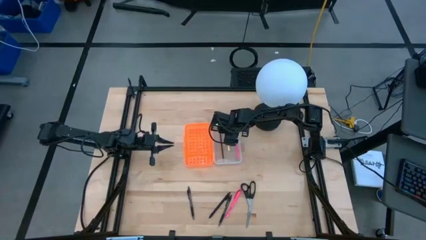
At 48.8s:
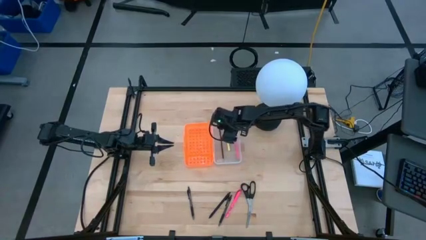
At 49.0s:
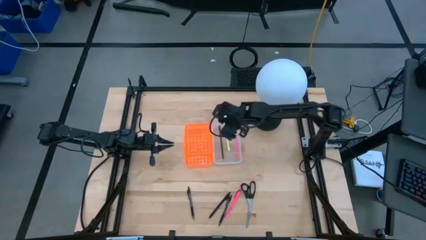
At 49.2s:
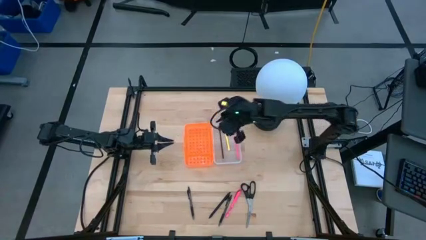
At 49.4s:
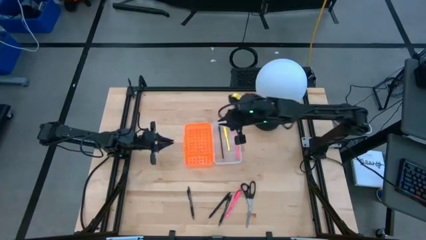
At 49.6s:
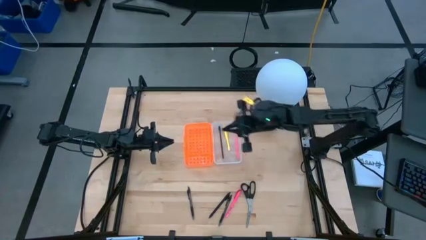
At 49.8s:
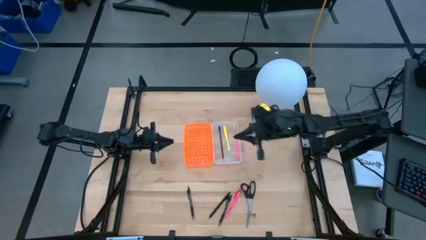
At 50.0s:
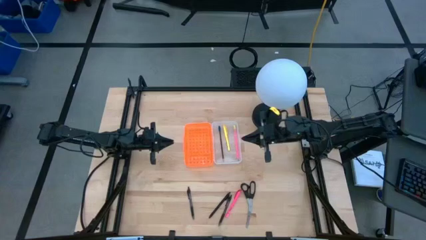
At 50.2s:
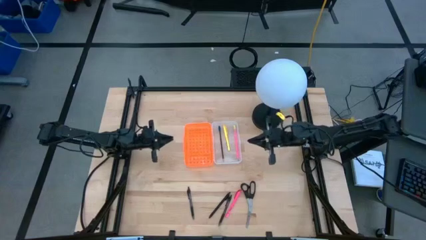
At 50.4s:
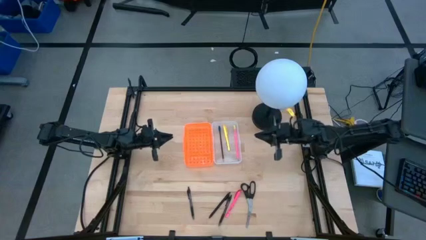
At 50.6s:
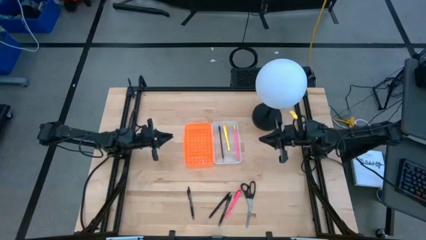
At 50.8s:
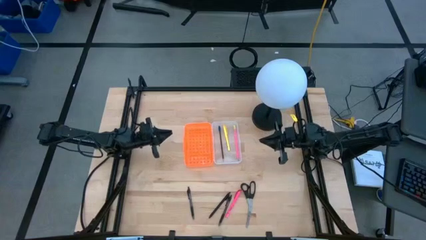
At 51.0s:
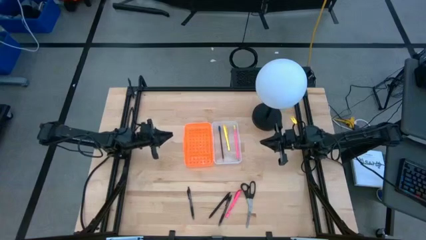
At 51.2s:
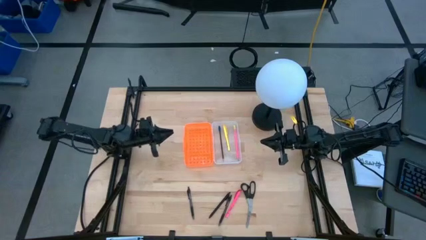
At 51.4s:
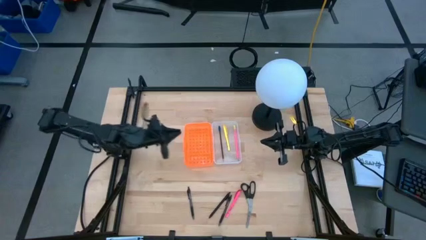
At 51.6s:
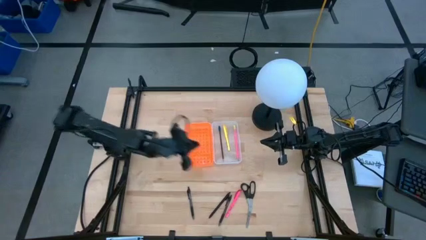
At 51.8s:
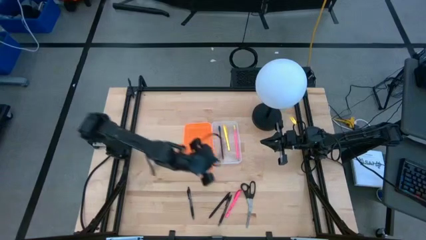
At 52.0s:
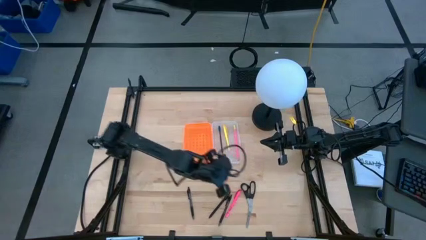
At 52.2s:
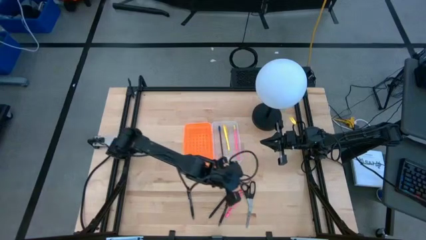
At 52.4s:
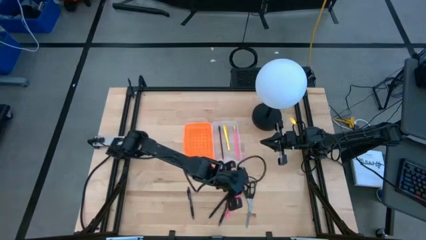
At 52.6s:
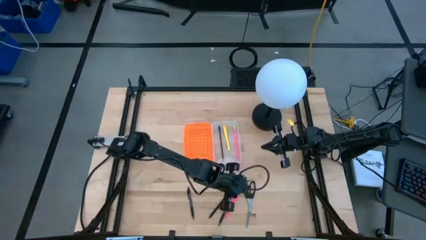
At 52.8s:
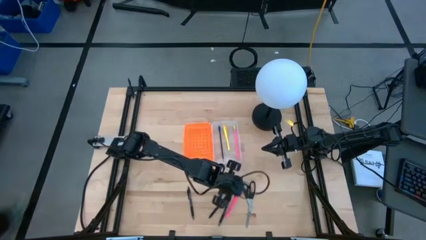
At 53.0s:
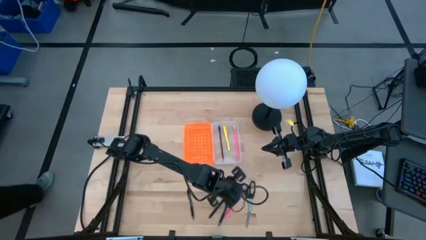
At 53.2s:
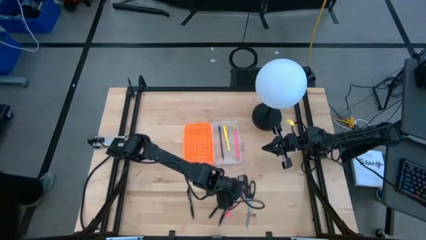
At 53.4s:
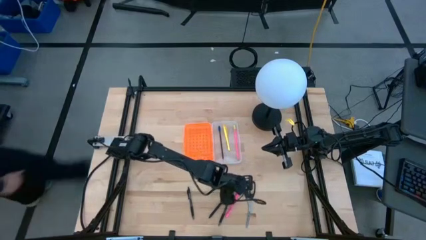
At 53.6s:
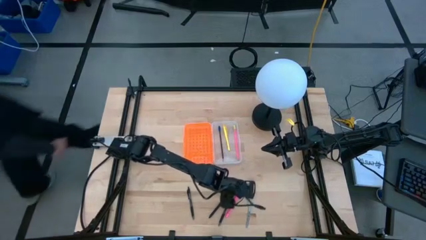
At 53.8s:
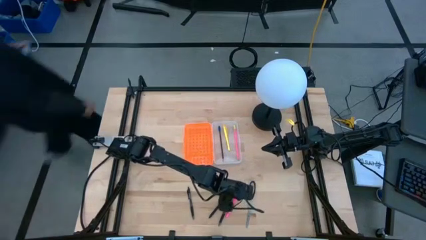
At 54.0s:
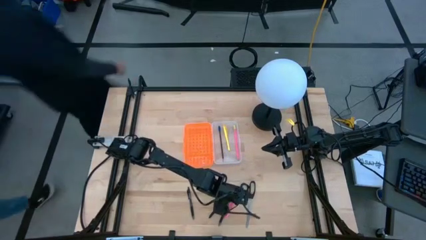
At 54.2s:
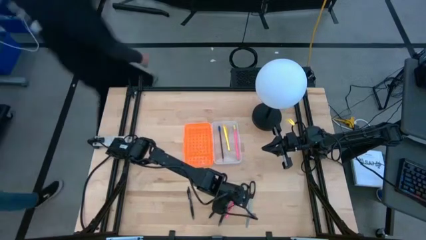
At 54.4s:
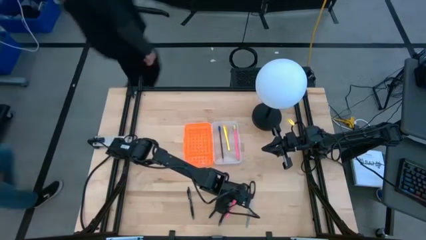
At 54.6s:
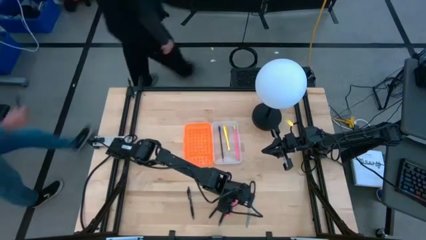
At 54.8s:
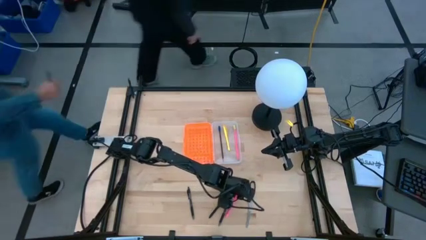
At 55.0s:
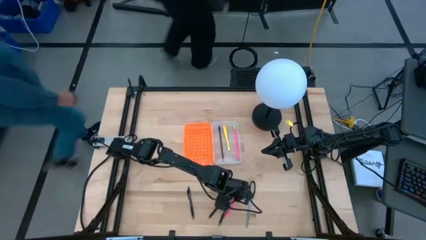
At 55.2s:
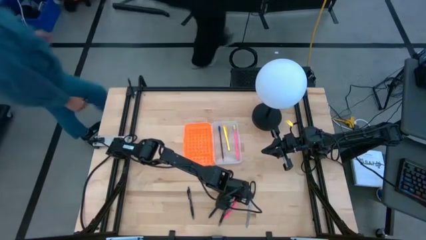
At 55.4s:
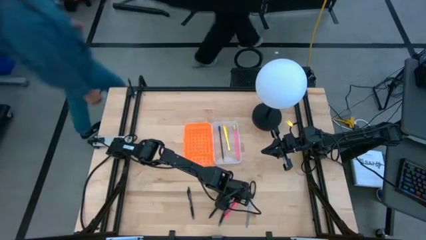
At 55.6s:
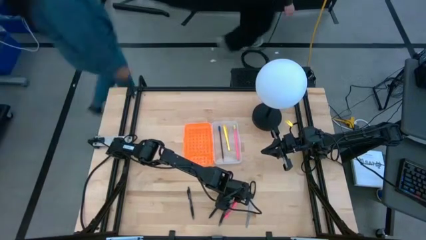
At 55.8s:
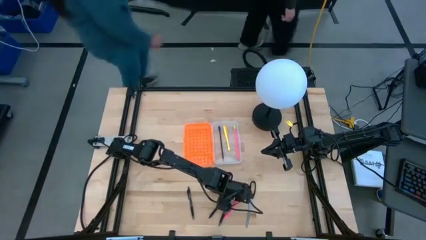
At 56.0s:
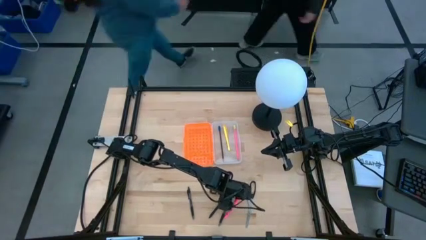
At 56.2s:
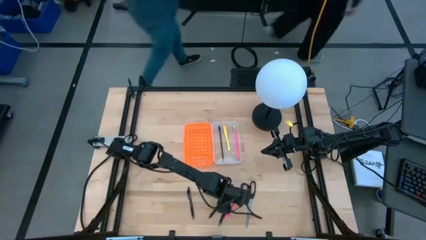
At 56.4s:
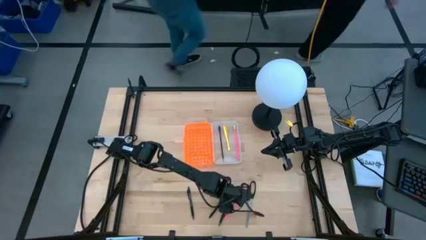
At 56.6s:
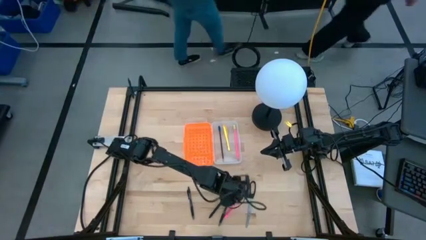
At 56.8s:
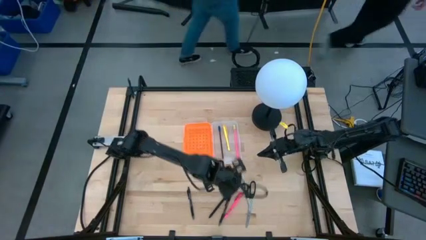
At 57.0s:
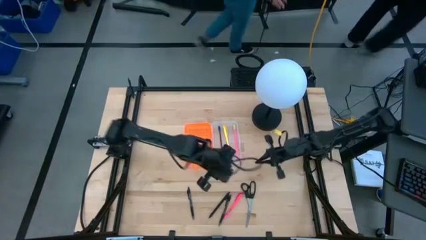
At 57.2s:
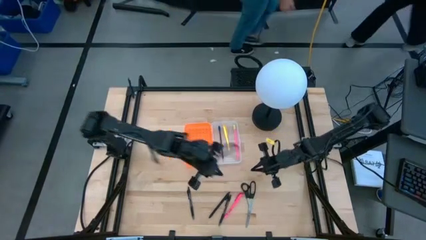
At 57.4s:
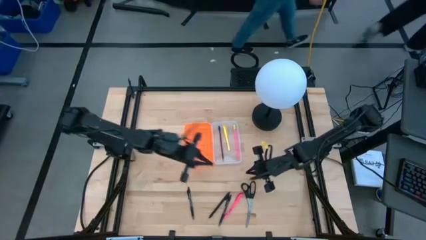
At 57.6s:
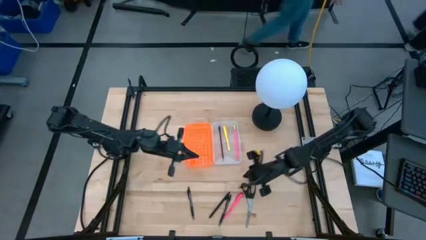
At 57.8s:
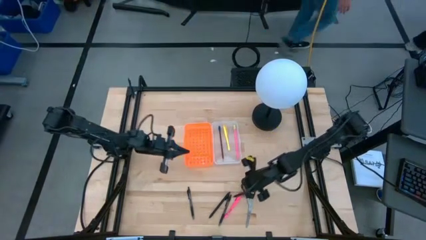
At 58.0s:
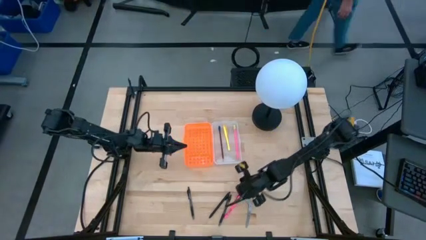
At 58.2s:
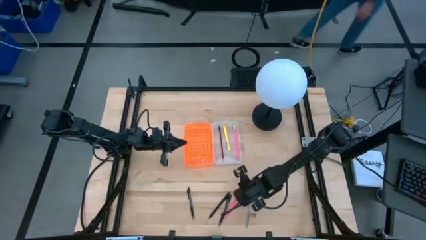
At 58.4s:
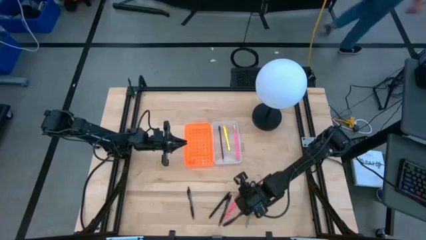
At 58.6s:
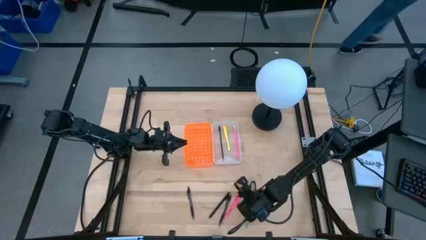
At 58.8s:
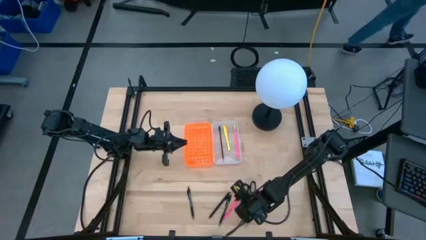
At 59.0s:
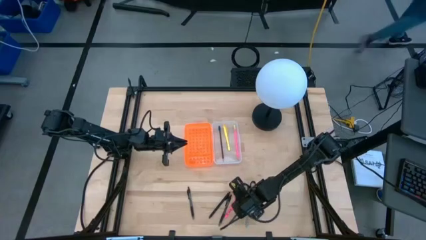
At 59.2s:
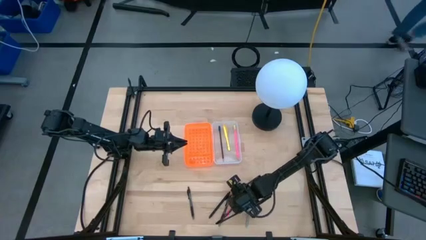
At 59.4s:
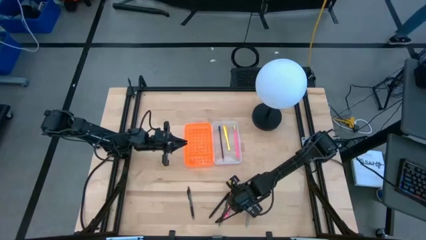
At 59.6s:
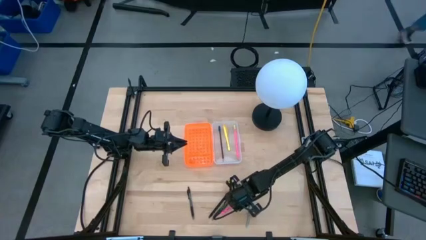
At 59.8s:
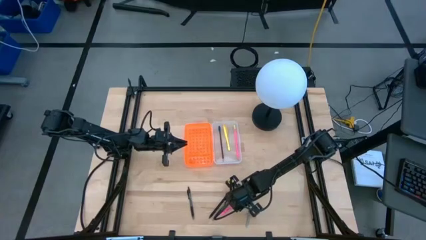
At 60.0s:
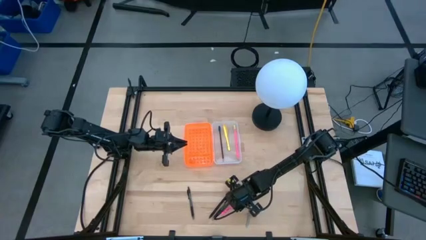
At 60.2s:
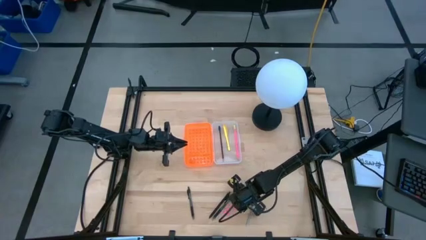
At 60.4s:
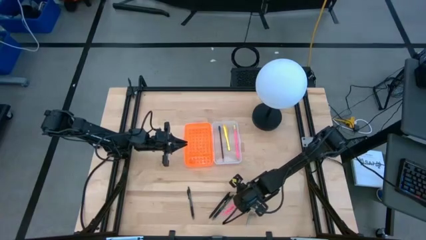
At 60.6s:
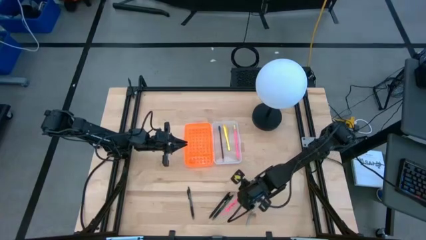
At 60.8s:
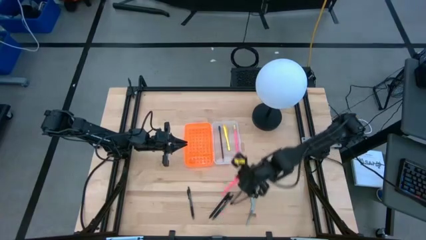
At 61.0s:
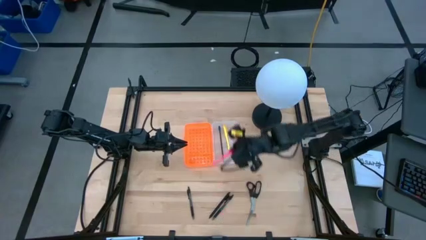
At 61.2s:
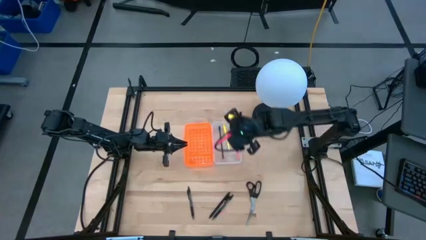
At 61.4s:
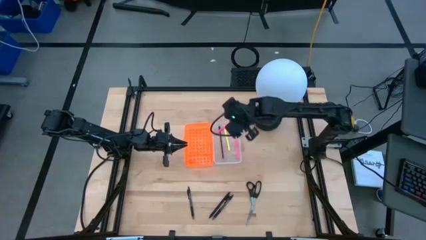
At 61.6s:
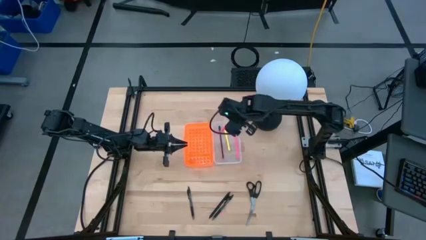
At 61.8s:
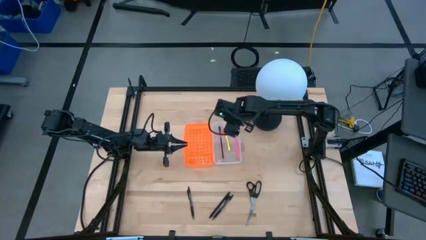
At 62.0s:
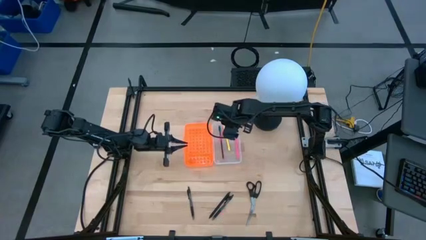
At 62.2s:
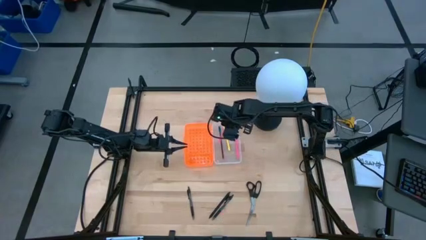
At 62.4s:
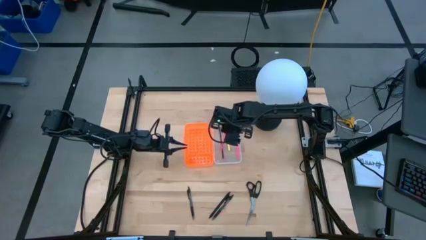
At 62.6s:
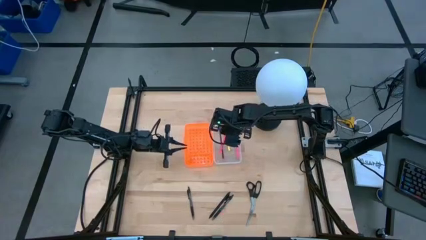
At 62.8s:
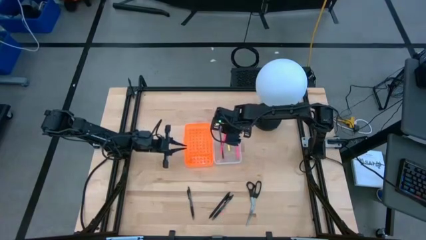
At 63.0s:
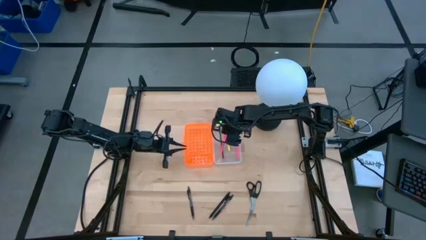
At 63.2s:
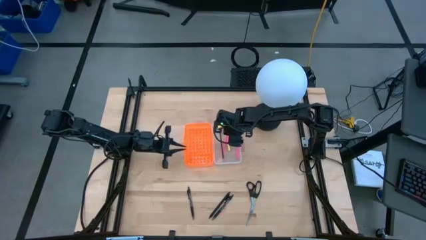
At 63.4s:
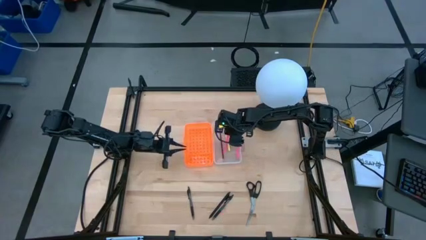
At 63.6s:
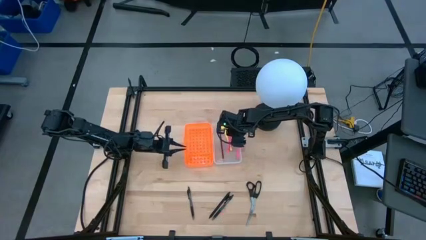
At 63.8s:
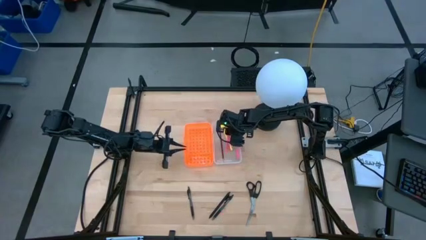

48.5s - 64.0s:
Task: Pick & place school supplies into a supply box
Put the pink pen into the orange supply box

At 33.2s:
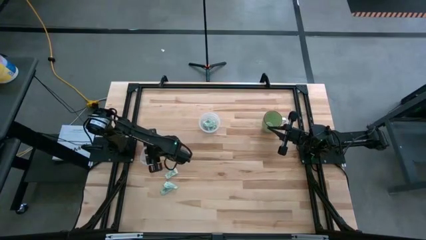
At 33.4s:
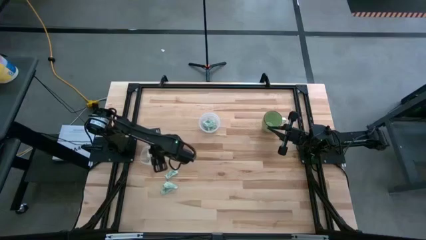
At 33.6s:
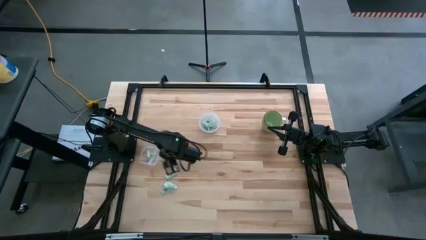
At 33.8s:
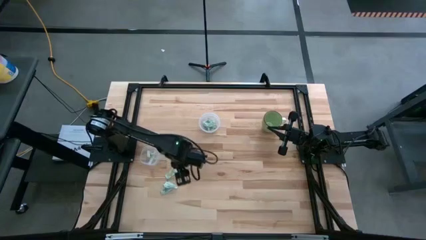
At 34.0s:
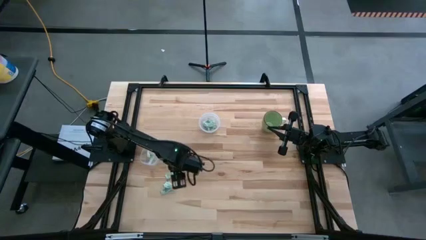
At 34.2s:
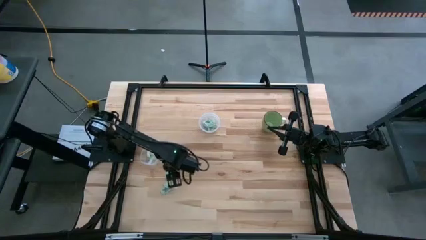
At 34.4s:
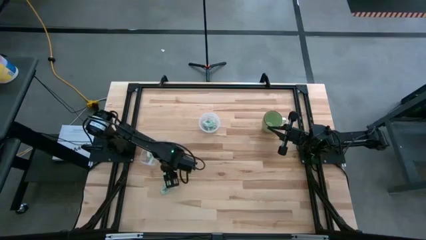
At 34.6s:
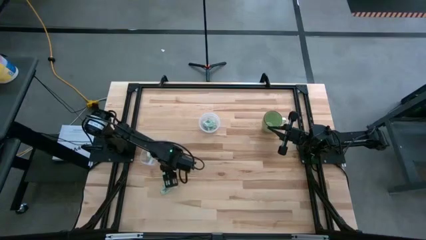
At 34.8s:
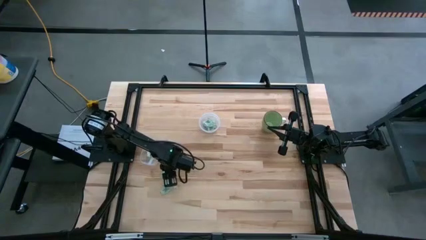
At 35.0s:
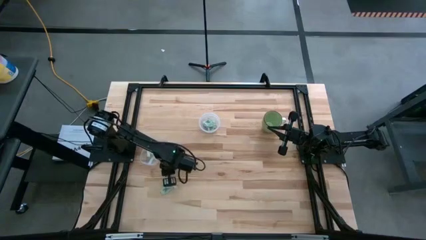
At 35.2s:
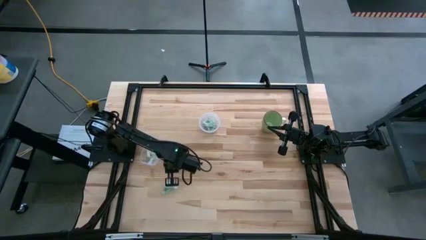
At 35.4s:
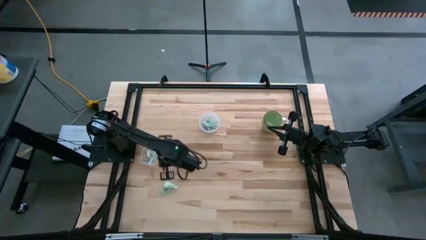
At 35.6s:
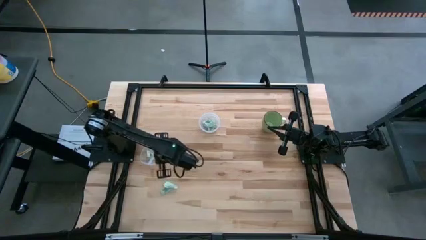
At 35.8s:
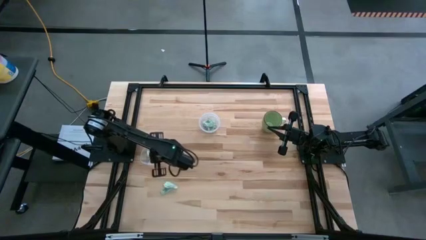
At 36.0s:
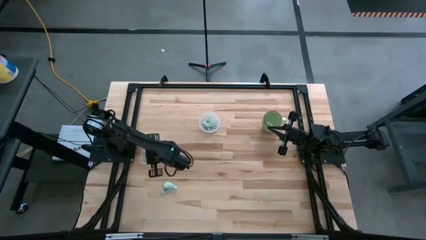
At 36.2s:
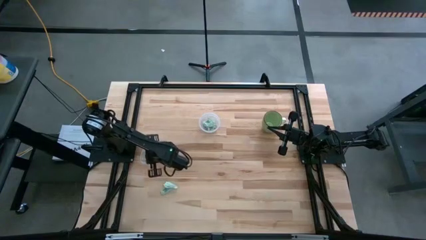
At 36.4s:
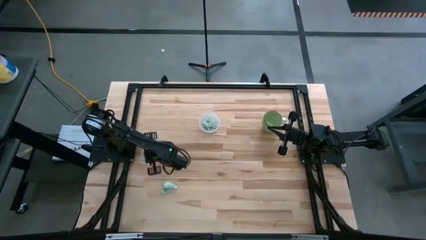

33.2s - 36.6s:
Task: Pick and place Stevia / Truvia into bins
Put the stevia packet into the left transparent container
